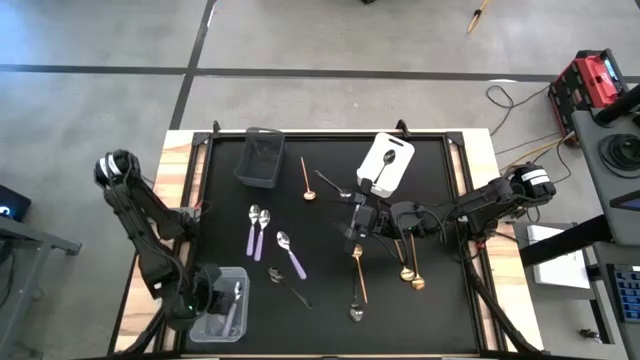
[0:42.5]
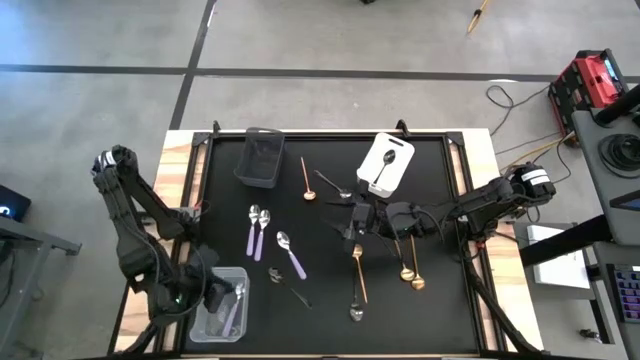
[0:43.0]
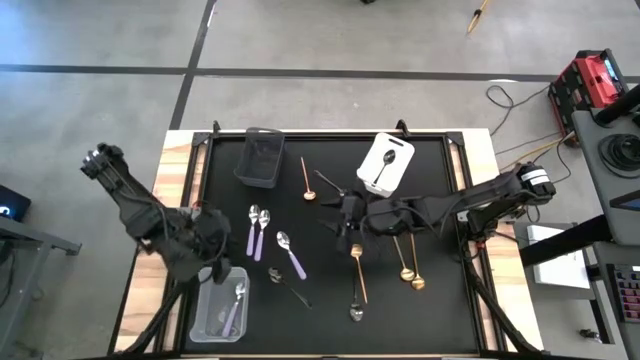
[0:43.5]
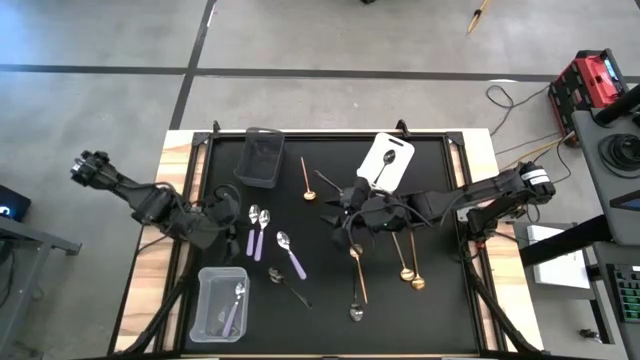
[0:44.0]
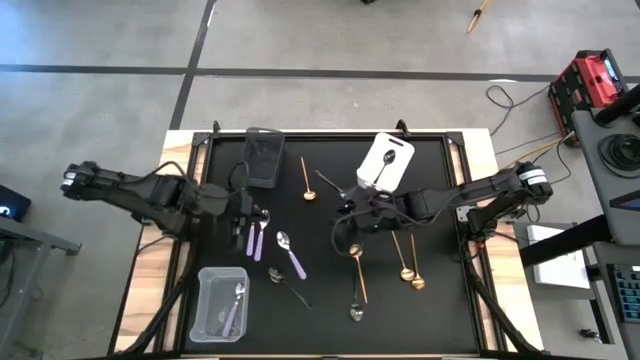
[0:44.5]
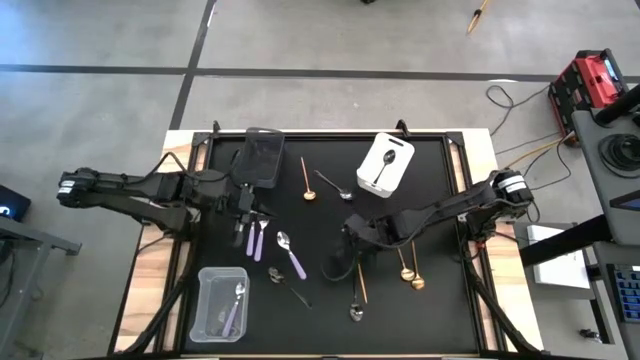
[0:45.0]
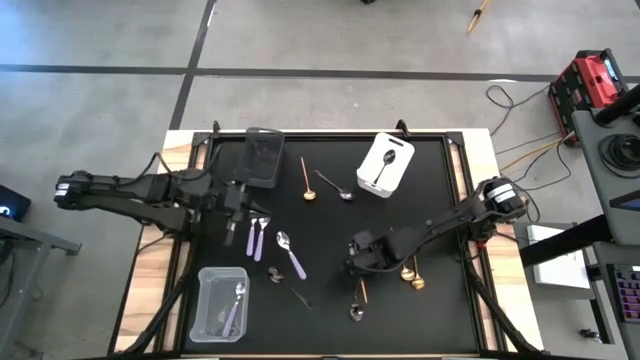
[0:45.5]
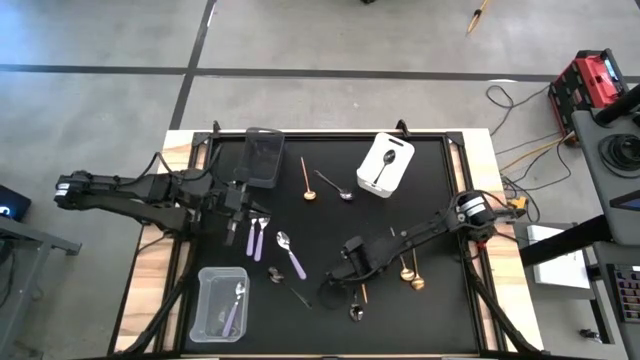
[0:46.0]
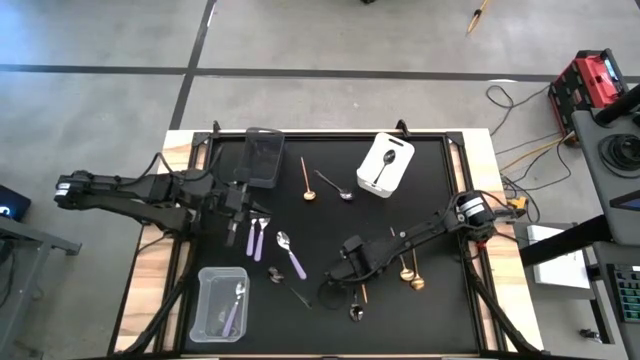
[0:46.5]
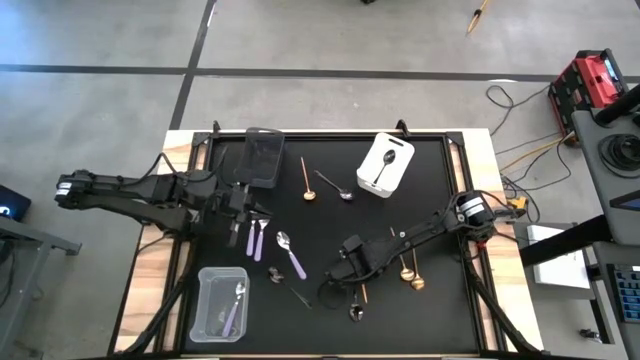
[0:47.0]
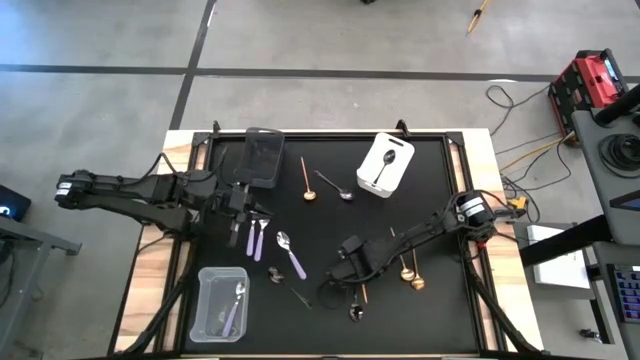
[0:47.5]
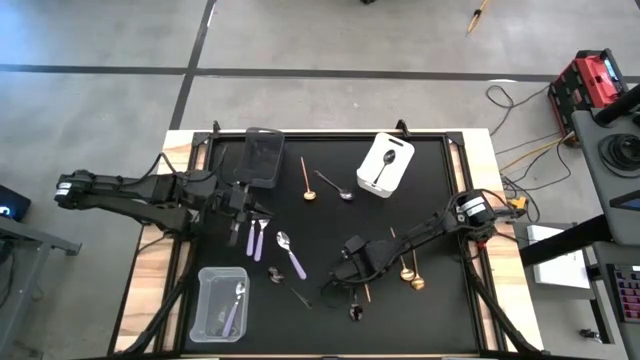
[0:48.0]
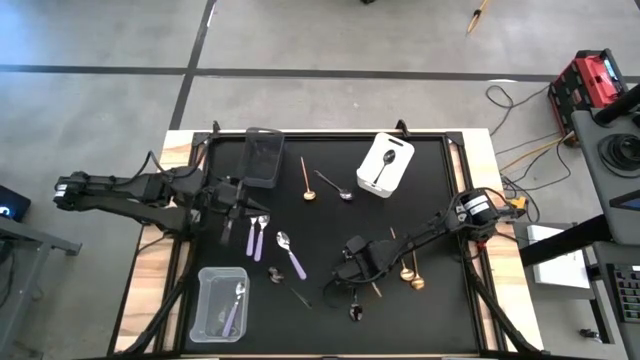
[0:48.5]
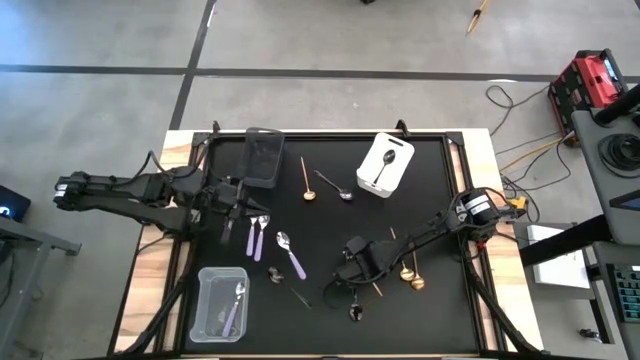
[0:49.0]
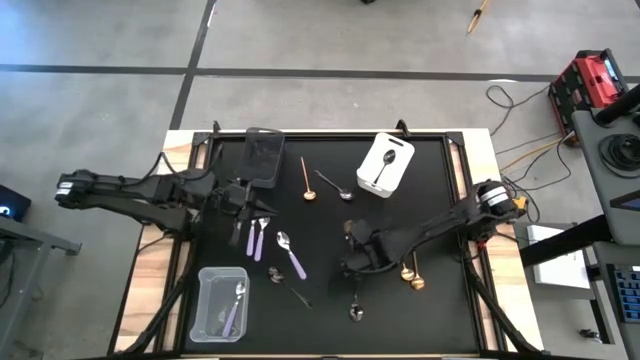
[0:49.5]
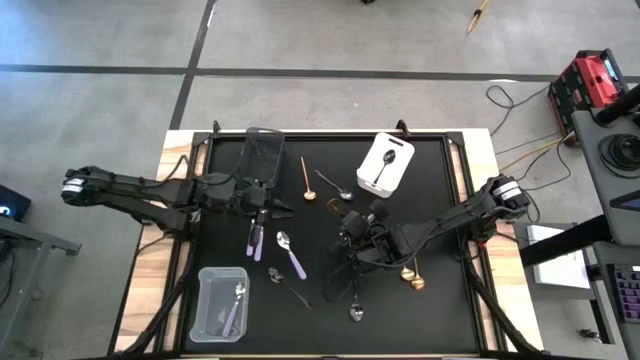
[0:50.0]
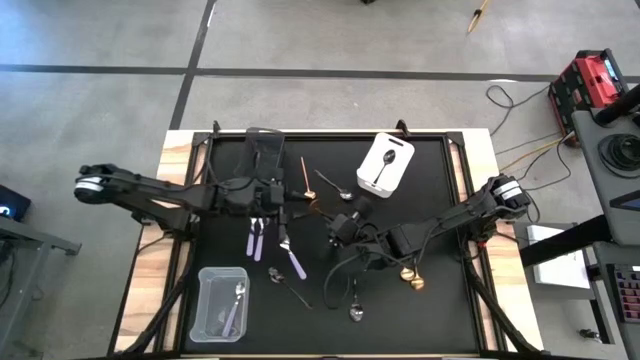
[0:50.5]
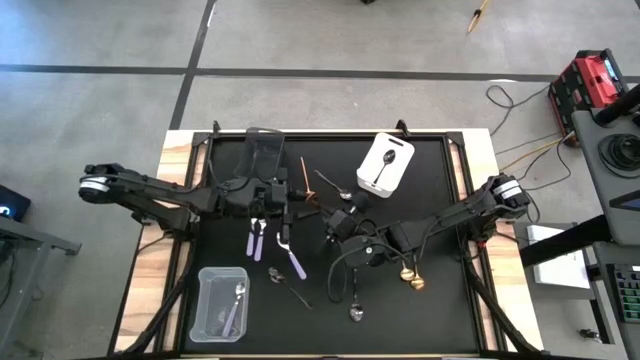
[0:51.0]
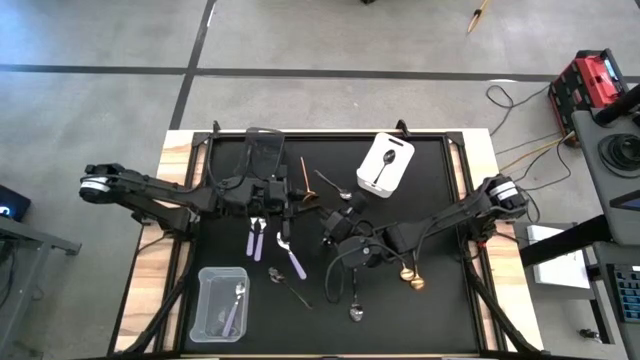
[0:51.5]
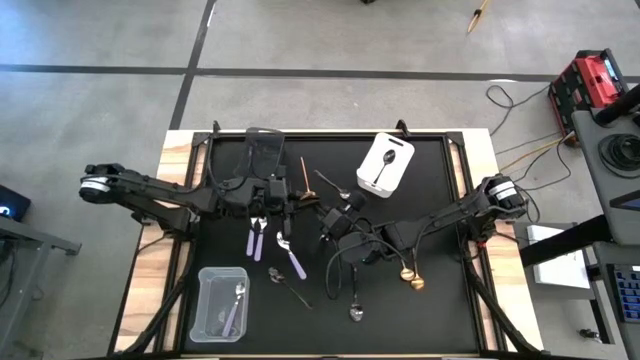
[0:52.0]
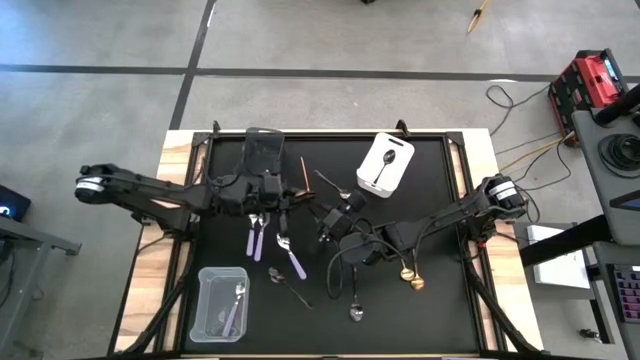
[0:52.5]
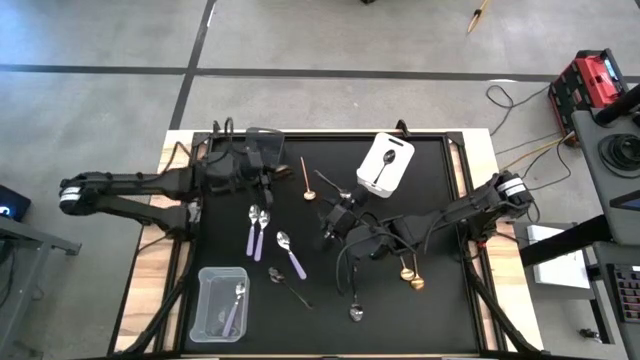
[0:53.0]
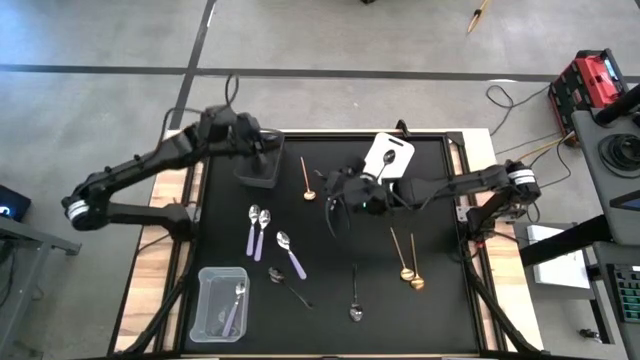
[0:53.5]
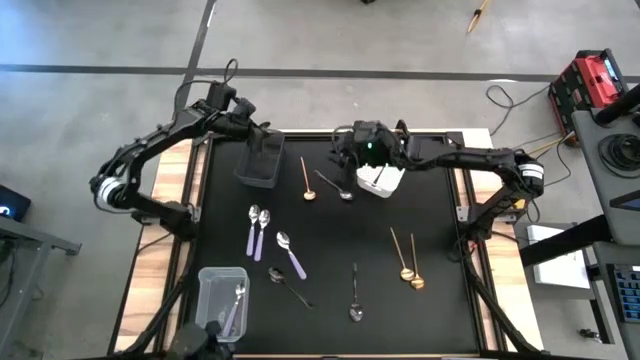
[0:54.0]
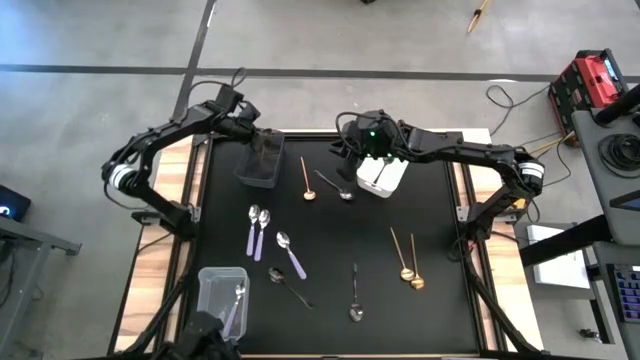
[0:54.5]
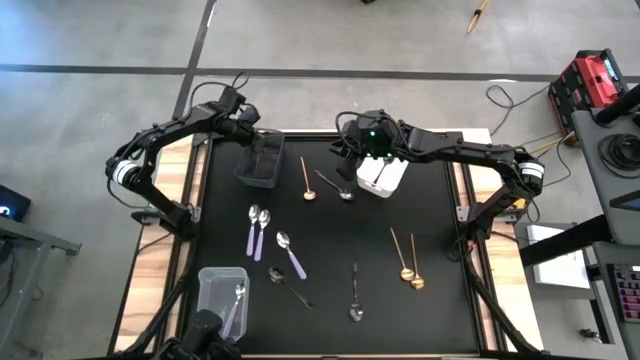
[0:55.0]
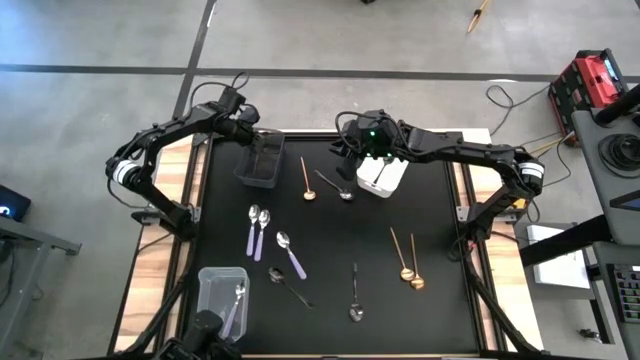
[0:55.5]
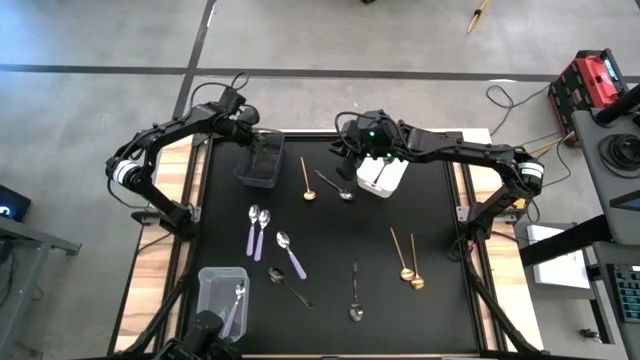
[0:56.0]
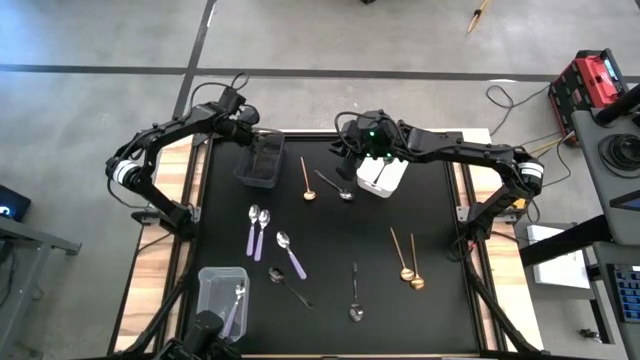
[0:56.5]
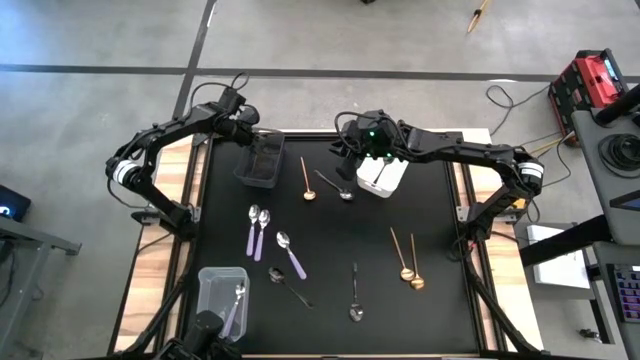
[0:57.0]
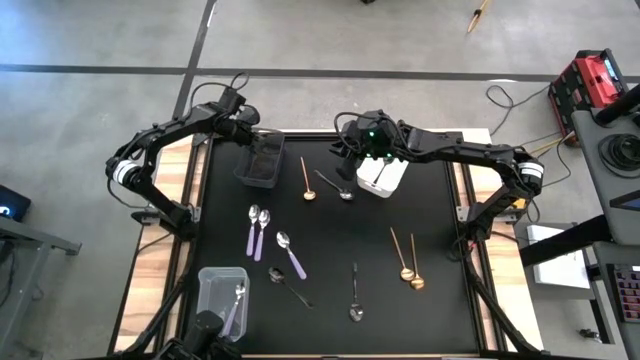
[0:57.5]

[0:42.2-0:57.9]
Task: Sort silverware by color (type)
Put the gold spoon into the black bin
